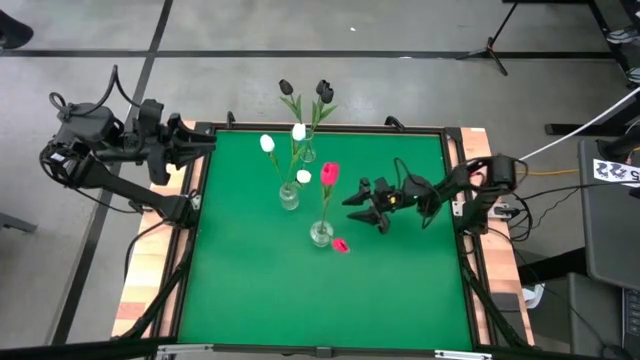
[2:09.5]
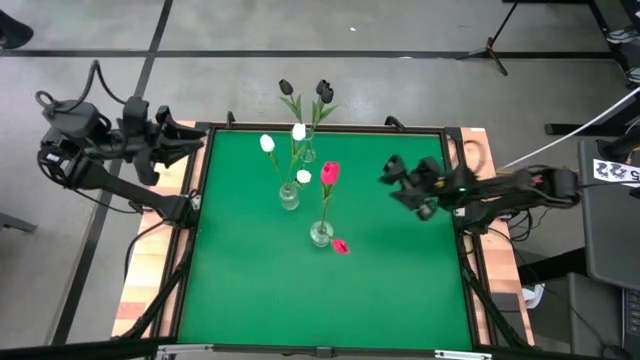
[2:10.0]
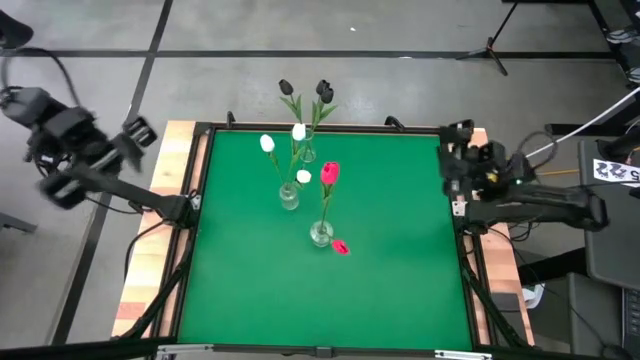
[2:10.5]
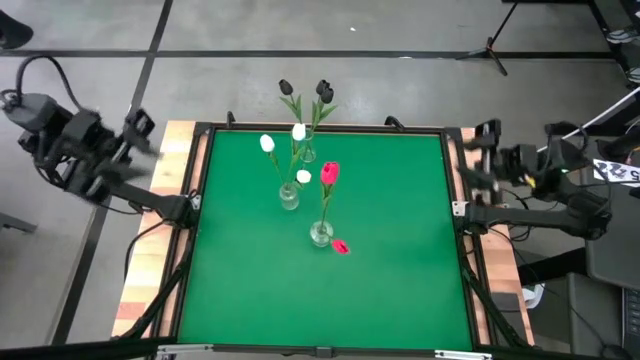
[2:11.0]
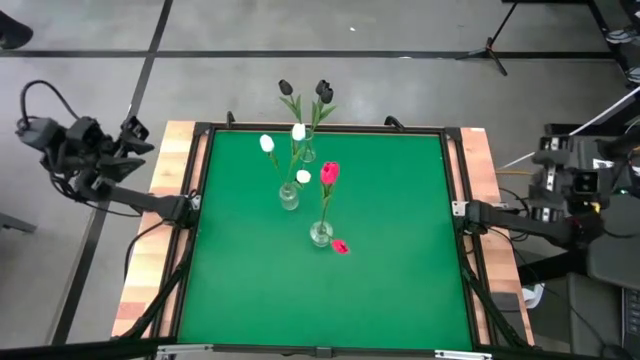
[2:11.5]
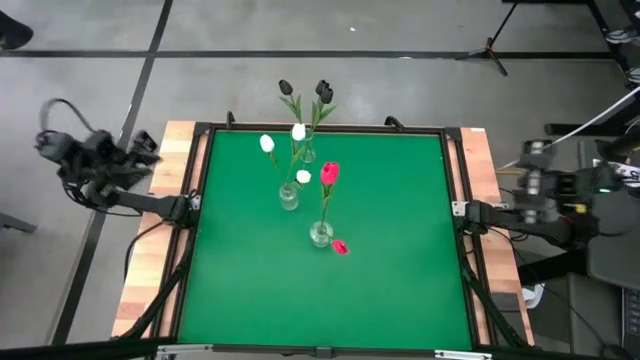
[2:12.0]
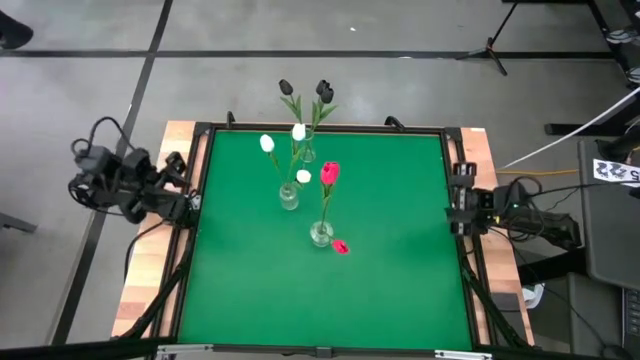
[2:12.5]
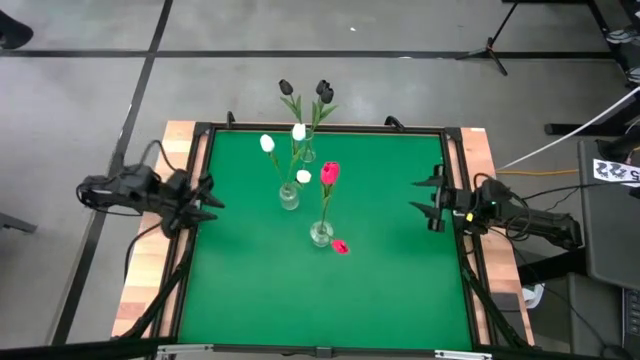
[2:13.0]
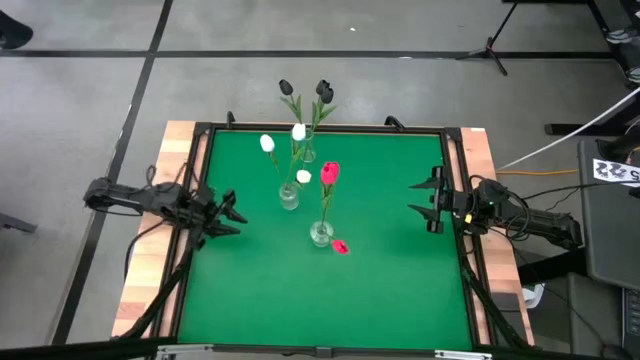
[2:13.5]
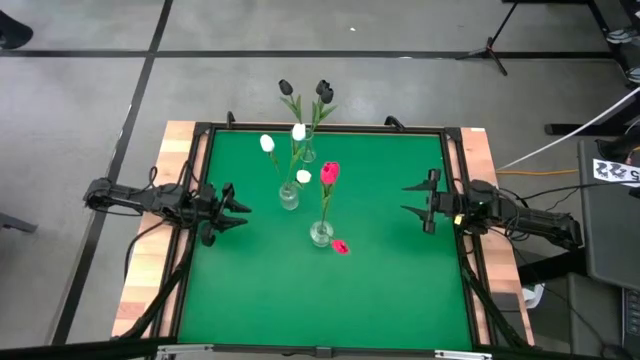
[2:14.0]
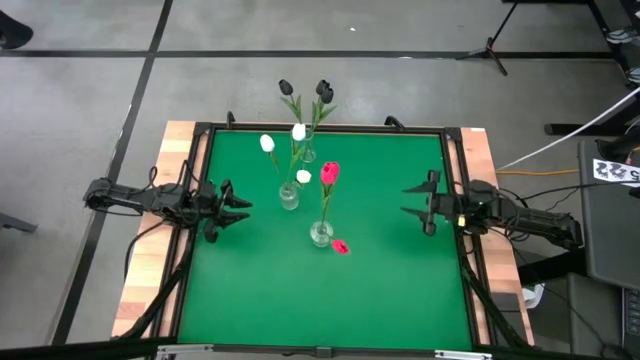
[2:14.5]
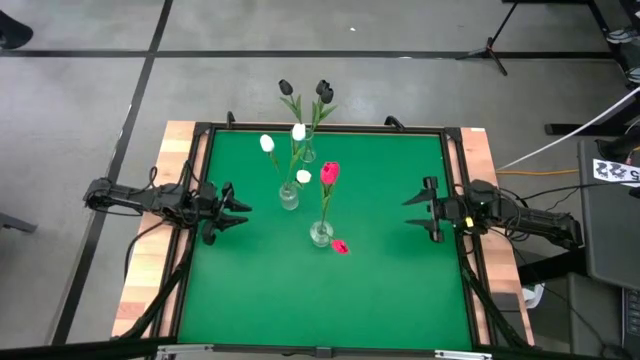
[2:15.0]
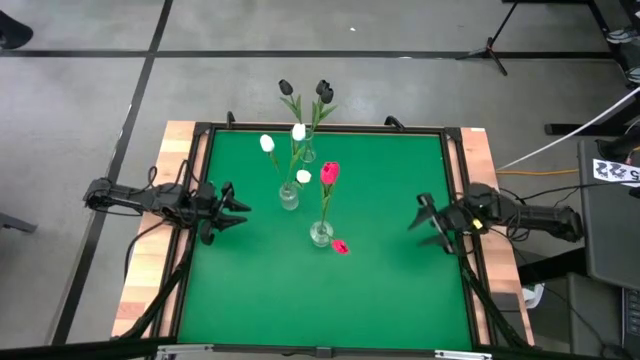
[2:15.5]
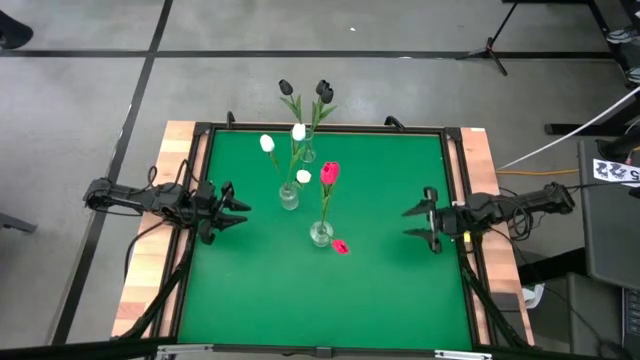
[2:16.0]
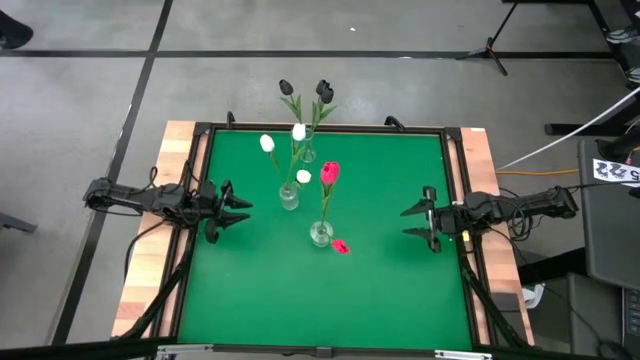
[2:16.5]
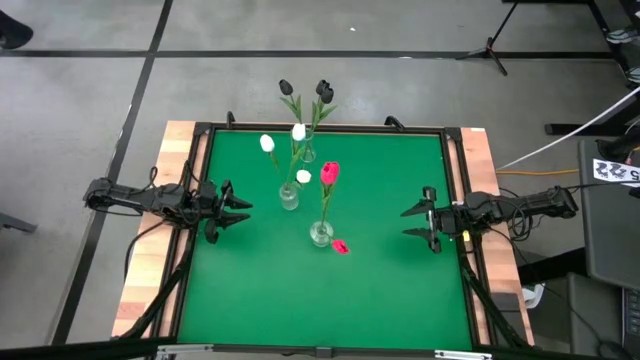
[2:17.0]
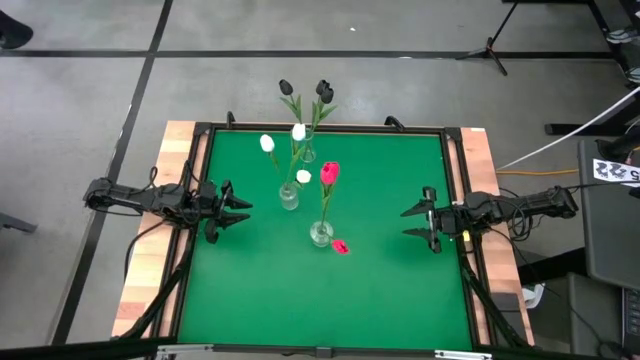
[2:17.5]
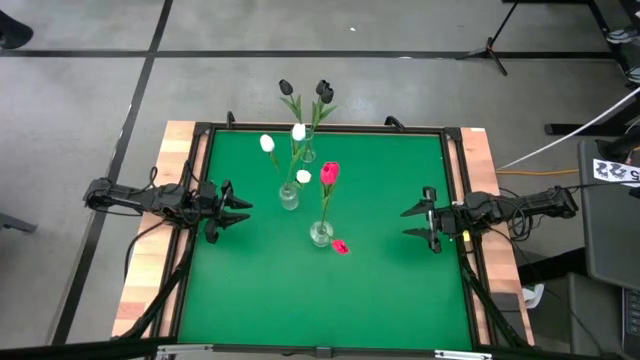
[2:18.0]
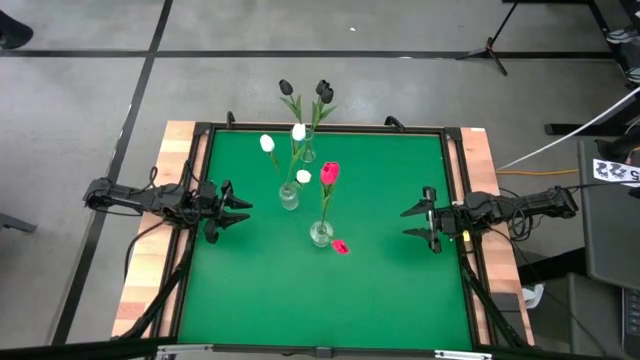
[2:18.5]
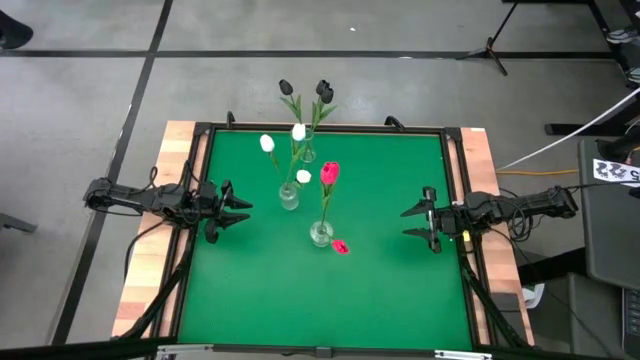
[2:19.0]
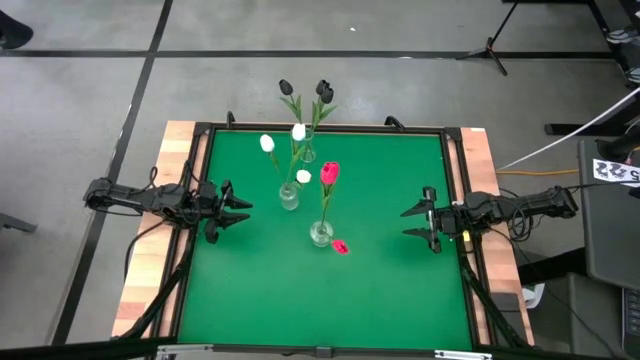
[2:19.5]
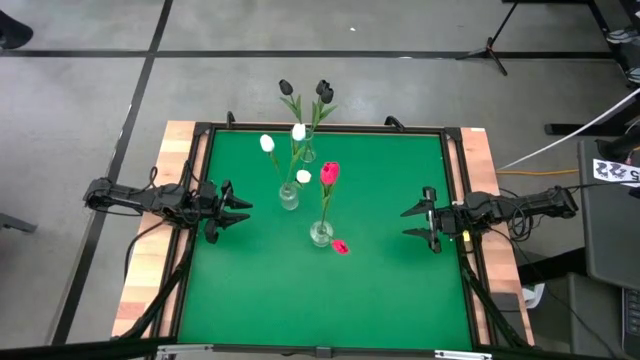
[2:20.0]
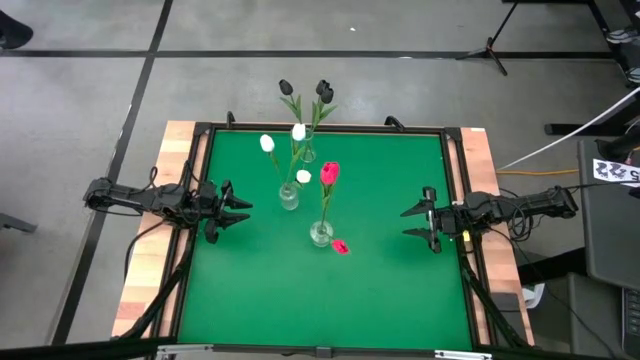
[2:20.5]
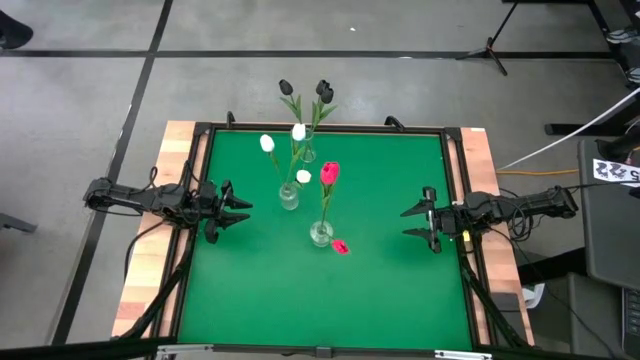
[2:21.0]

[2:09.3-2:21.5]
Task: Sort flowers into vase by color
Return to Home Position

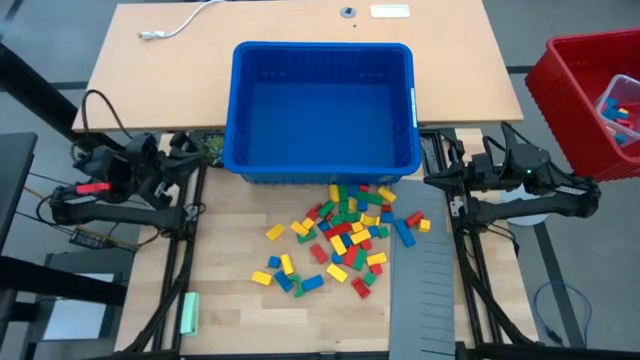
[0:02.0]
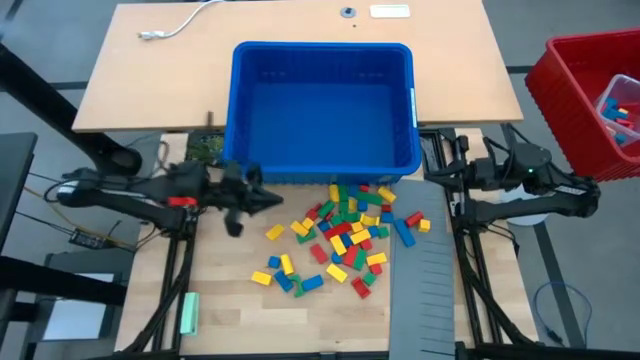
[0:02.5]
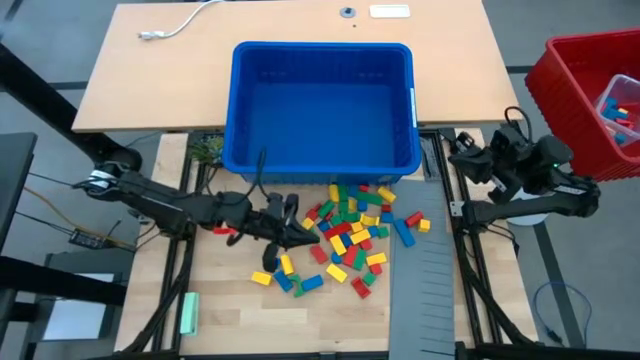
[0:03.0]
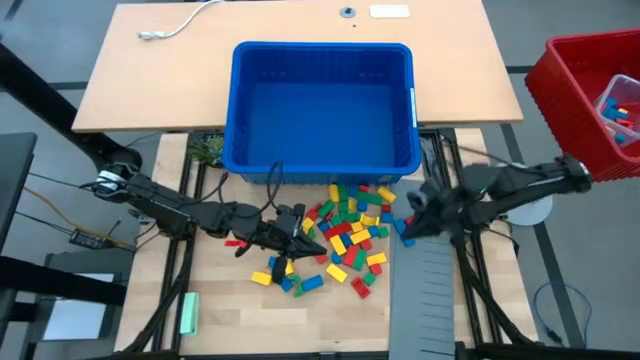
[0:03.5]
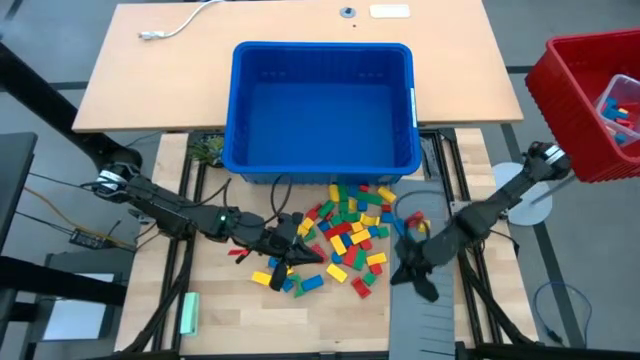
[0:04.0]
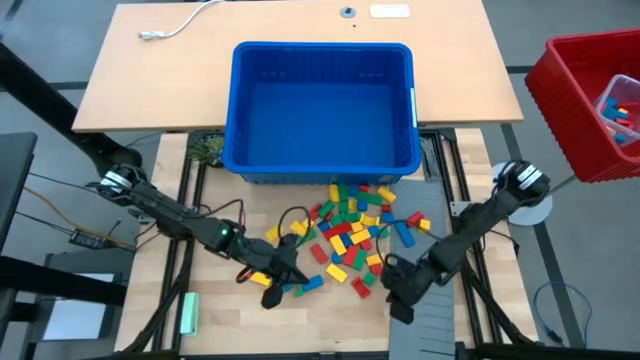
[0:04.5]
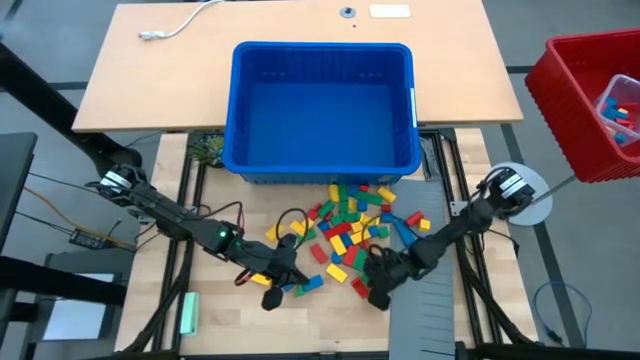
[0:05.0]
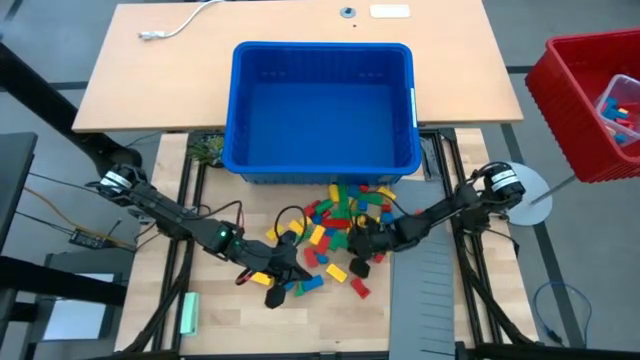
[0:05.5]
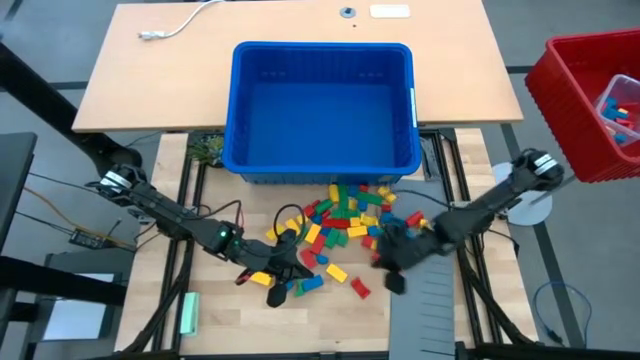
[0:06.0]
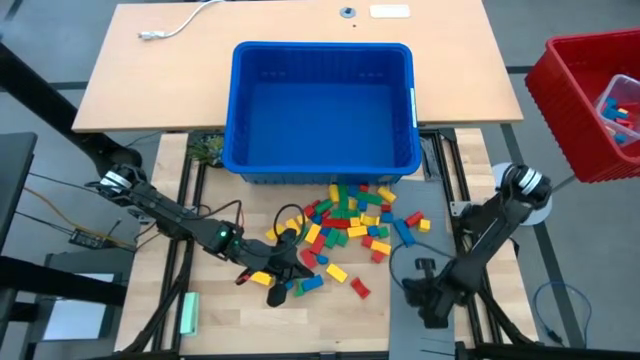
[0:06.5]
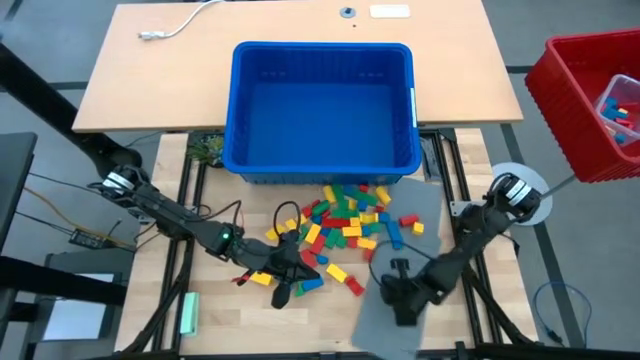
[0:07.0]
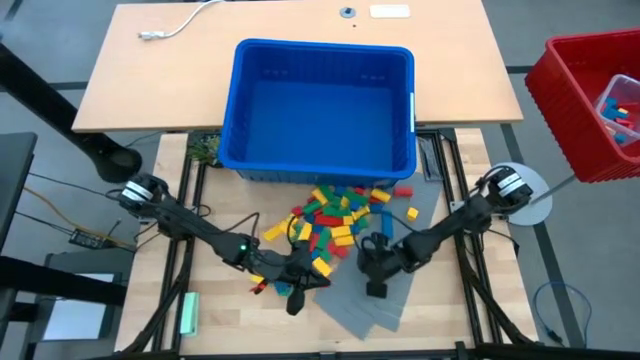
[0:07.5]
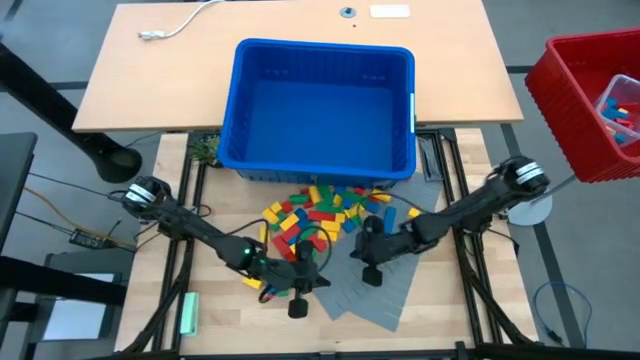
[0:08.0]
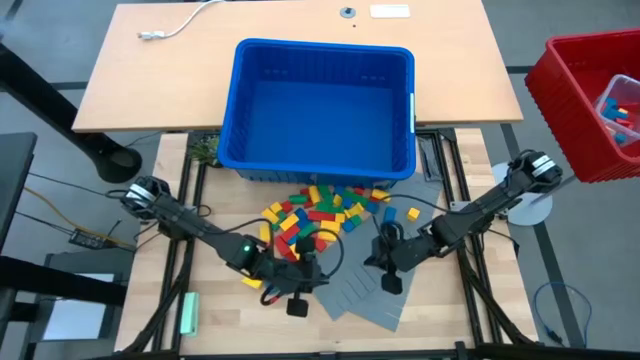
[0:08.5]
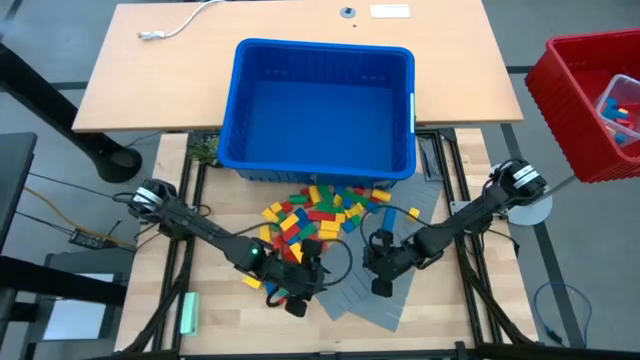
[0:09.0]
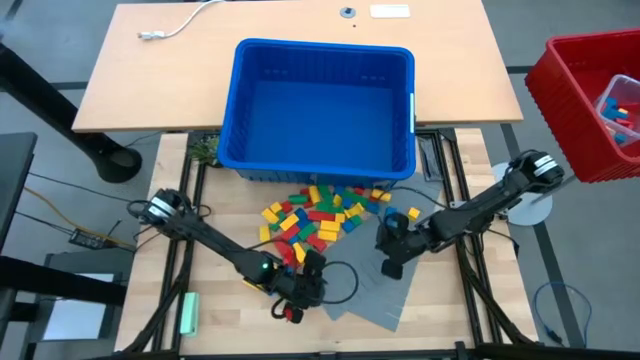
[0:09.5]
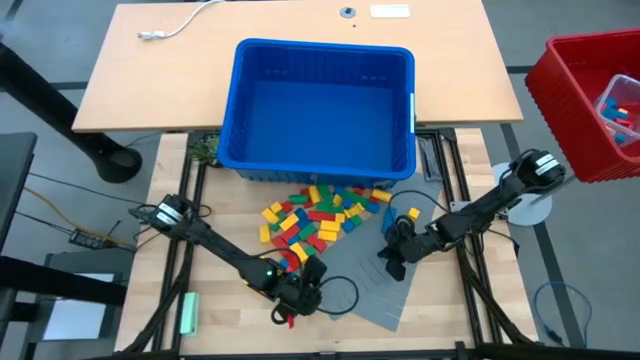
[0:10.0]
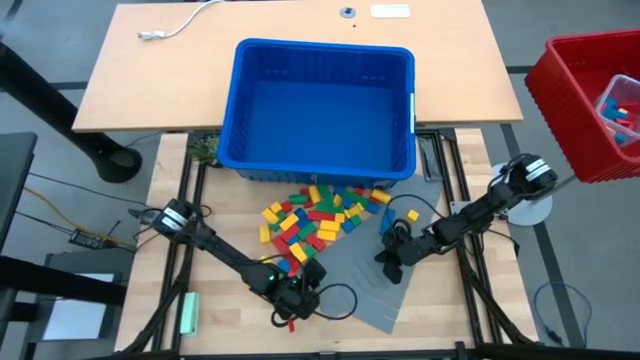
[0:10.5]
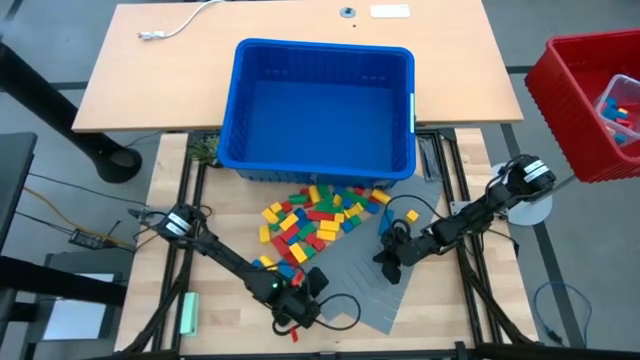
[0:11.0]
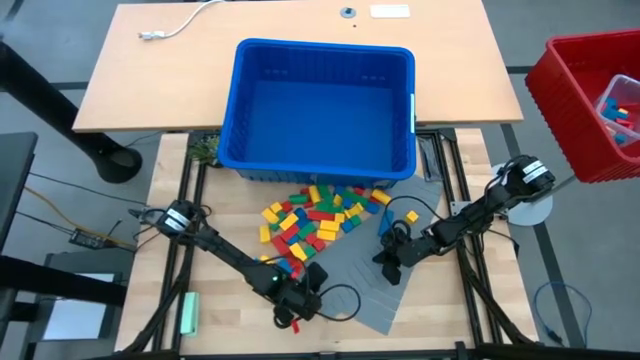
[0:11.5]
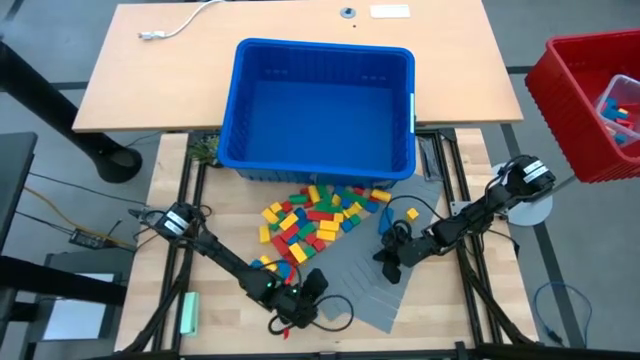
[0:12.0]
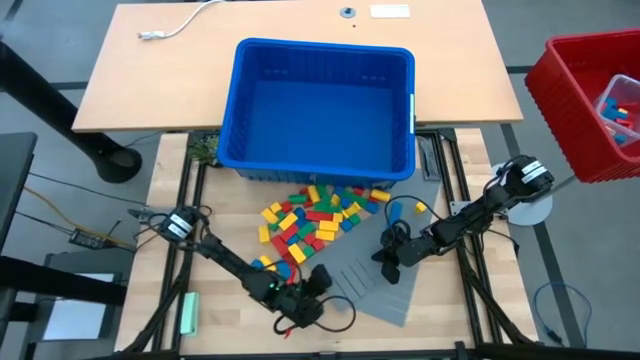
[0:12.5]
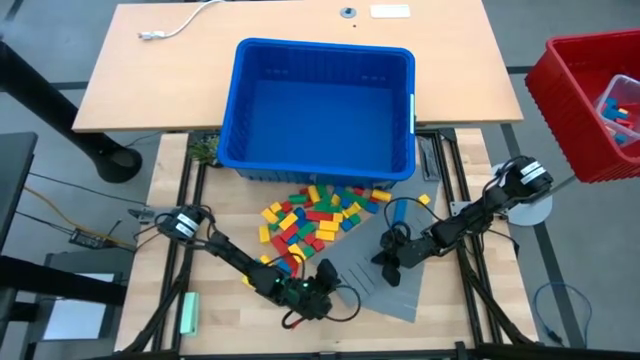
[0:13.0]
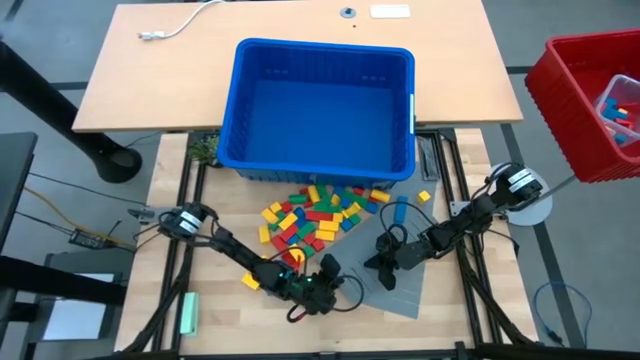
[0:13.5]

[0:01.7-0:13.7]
Task: Sort blocks
Assemble the blue bin using gray bin divider
